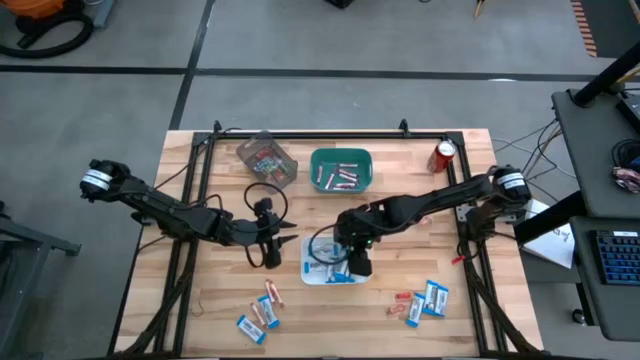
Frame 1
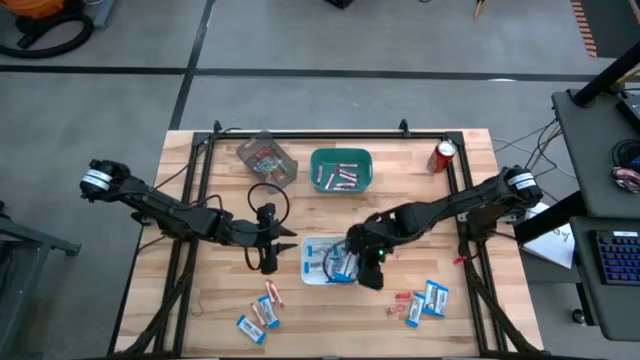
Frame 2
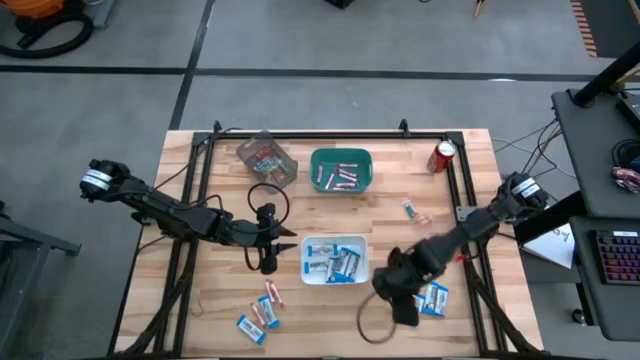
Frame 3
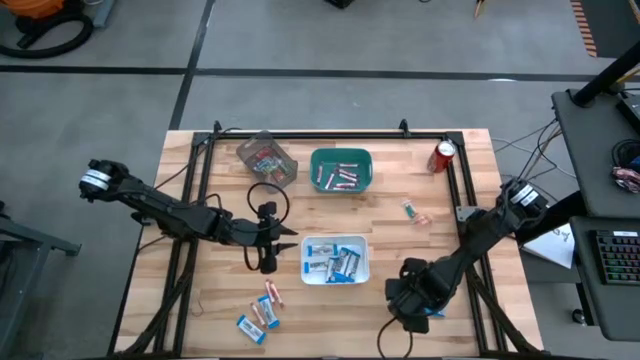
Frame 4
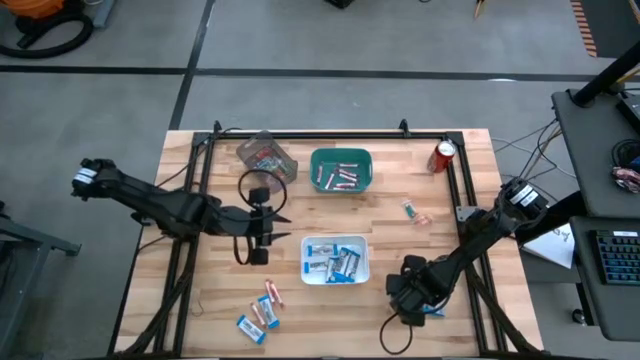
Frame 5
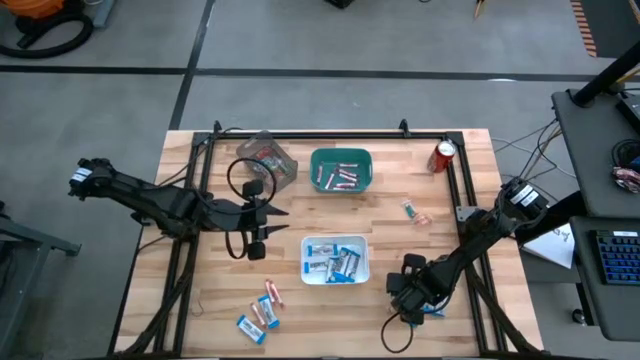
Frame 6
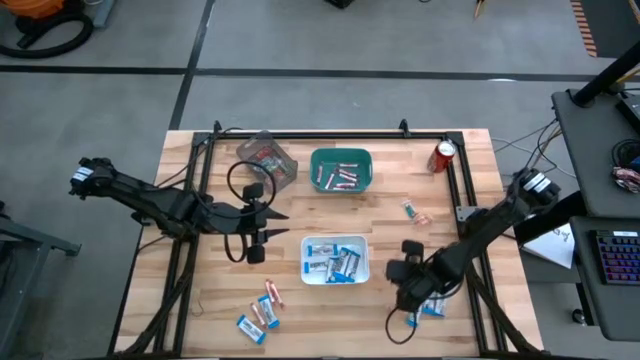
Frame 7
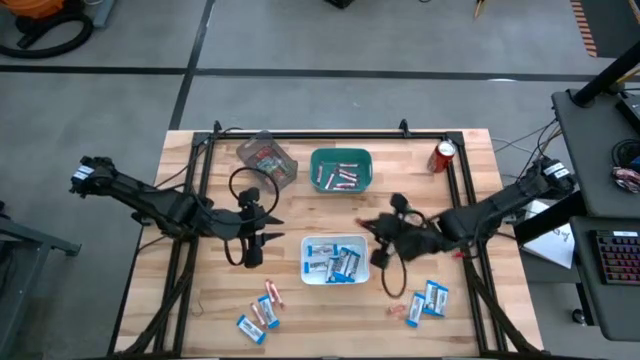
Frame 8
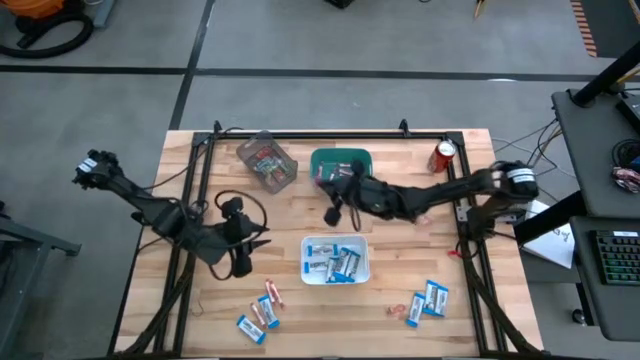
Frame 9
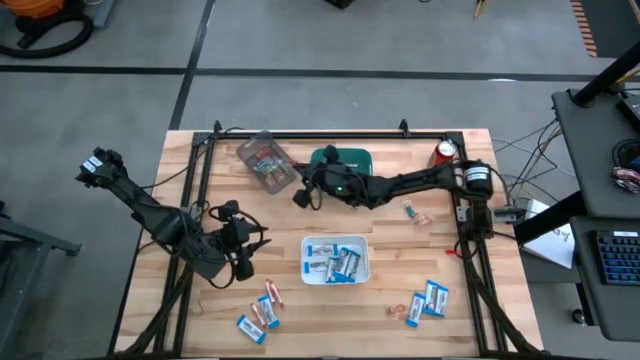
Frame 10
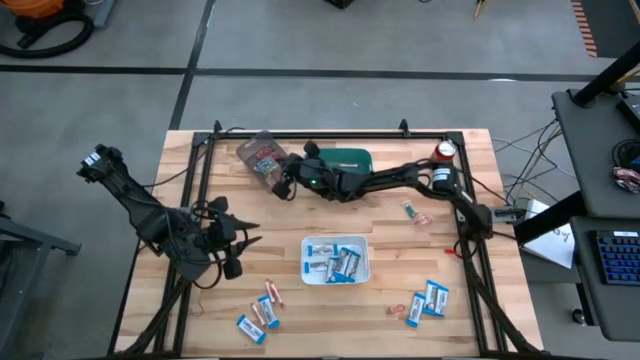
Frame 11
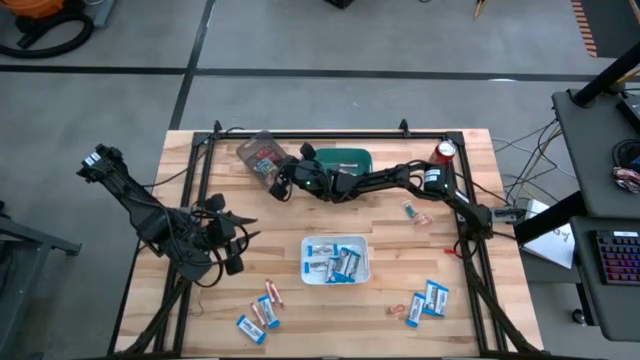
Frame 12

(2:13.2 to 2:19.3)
Task: Sort candy
Put the red gummy into the black bin

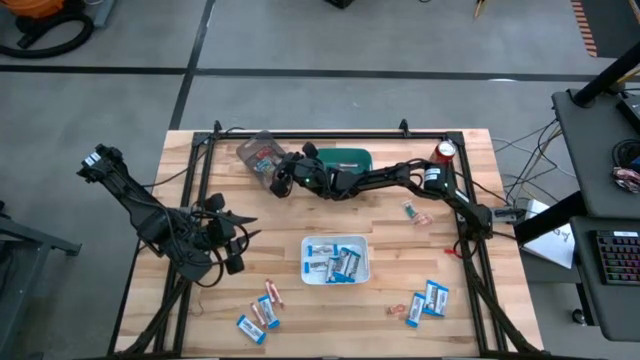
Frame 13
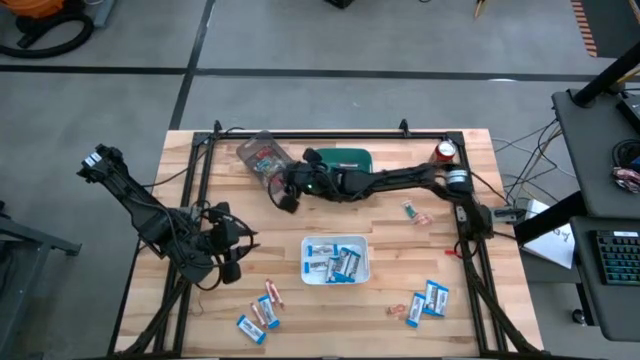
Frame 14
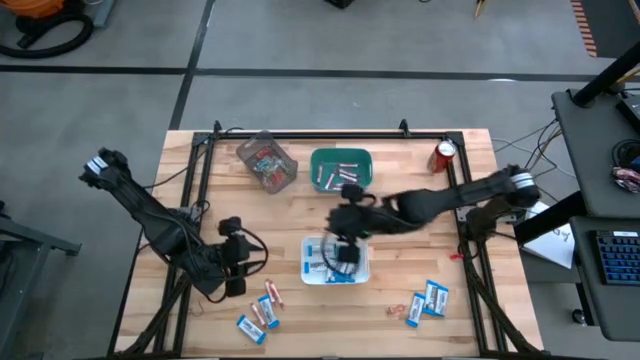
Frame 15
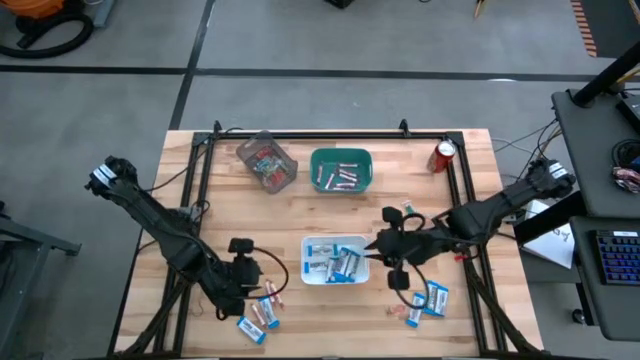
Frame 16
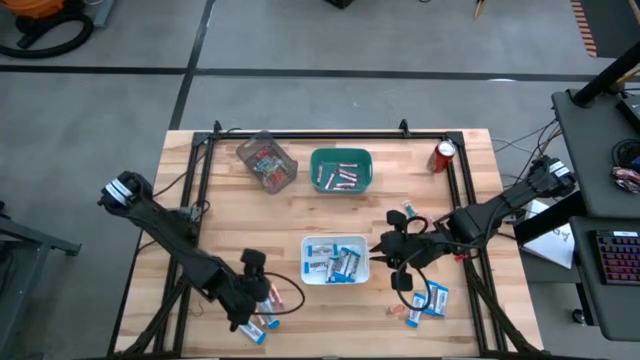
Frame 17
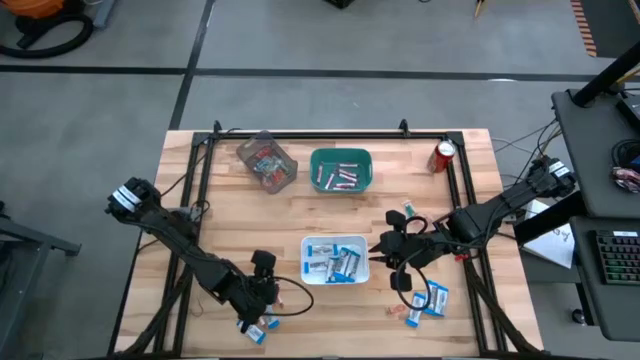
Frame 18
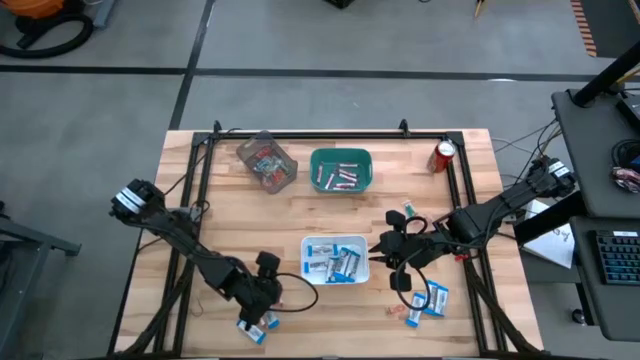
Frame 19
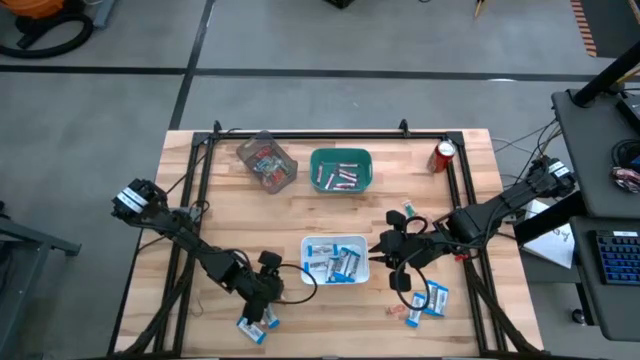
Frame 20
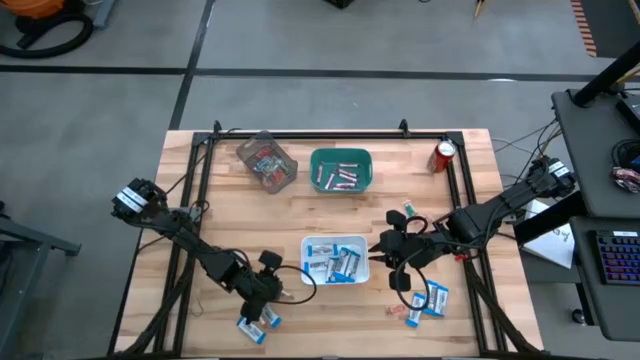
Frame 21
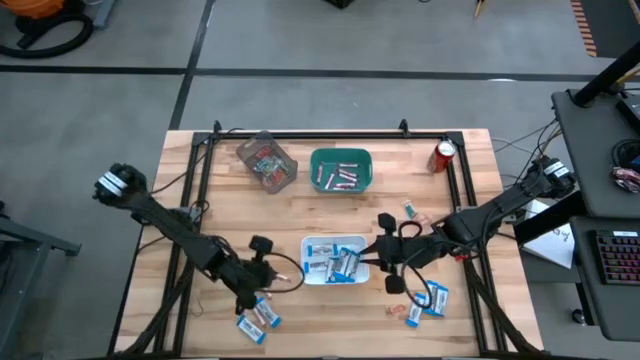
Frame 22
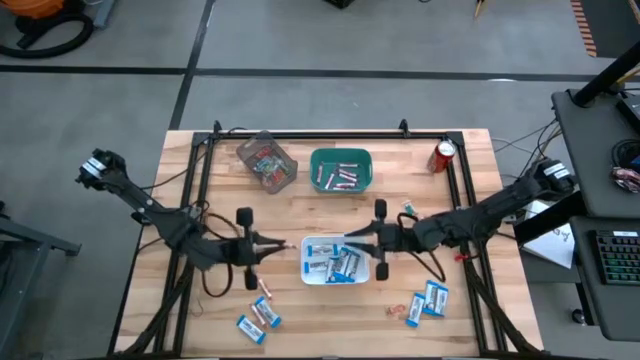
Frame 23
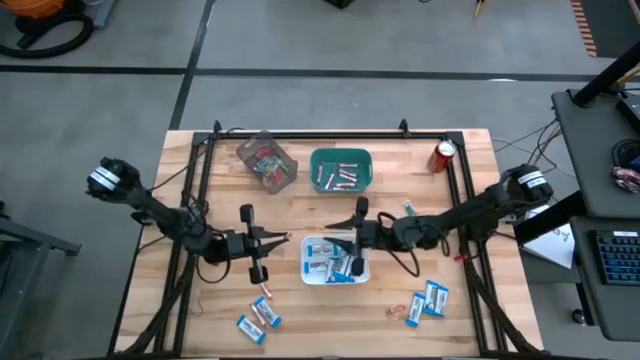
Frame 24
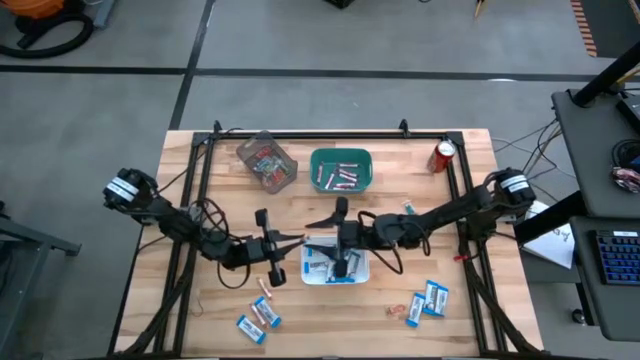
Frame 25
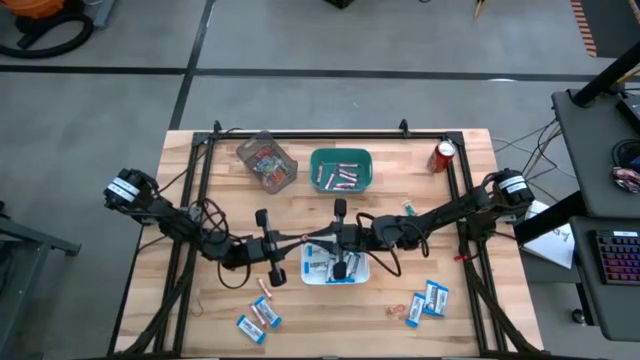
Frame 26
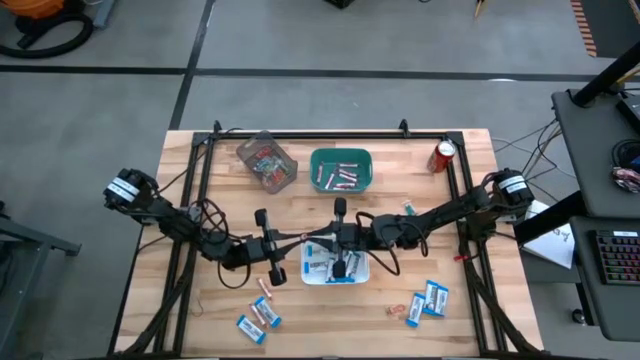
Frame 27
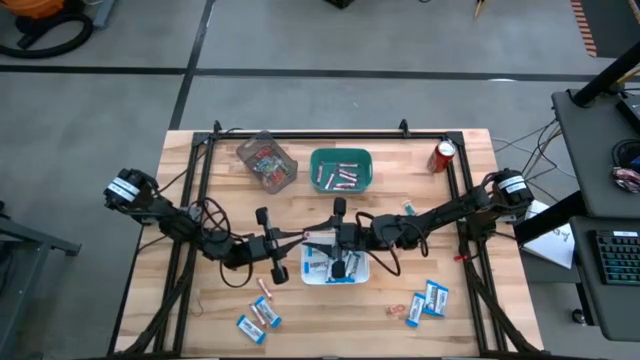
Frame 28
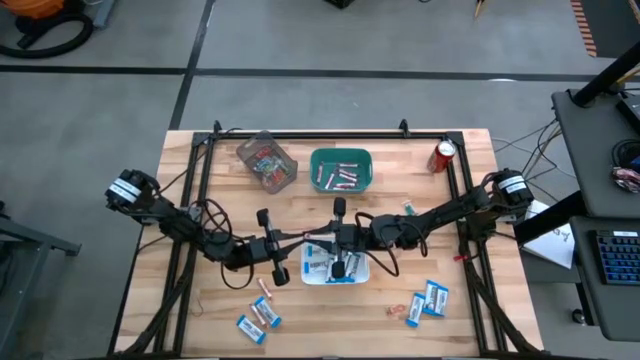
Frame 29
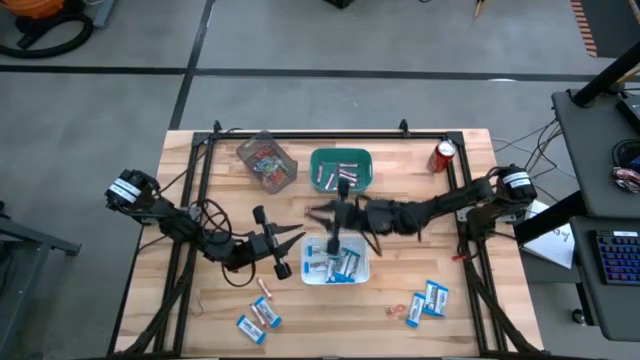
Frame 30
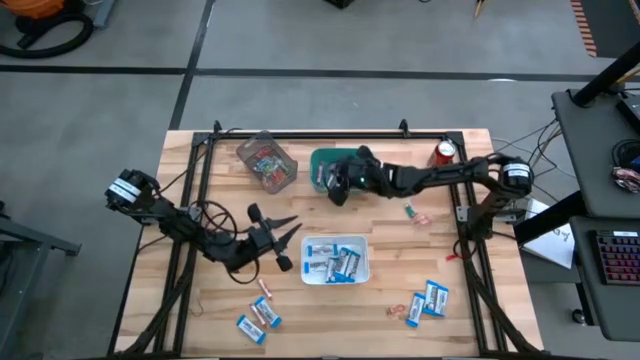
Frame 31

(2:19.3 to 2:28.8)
Put the white candy into the green bin

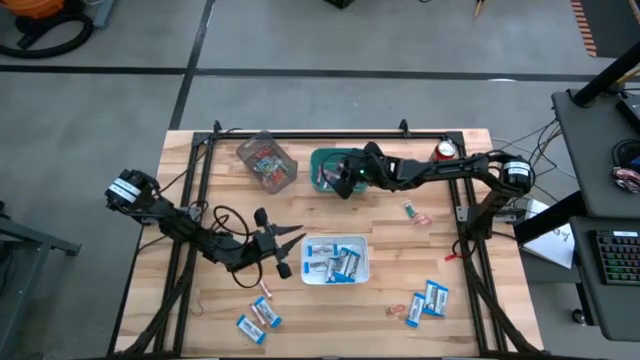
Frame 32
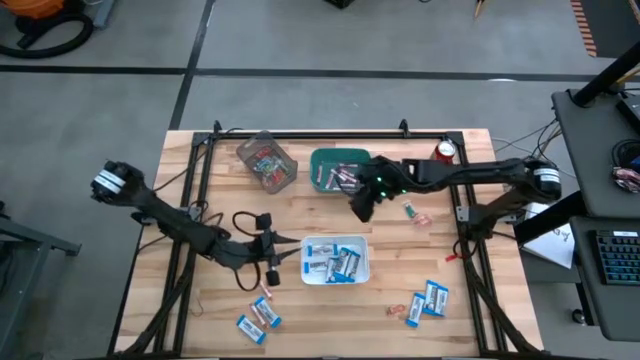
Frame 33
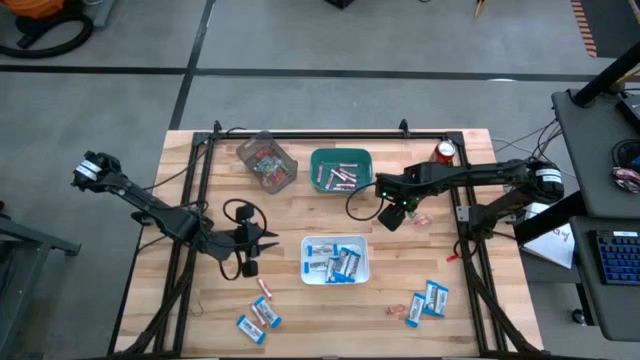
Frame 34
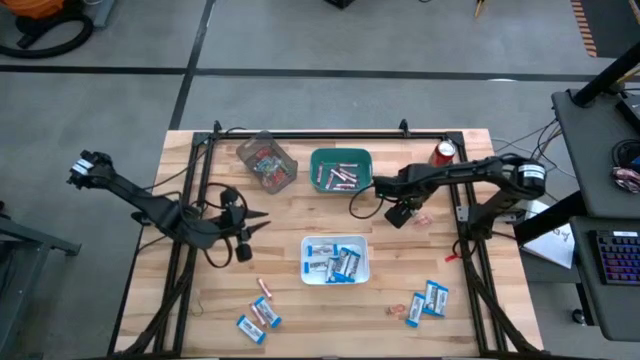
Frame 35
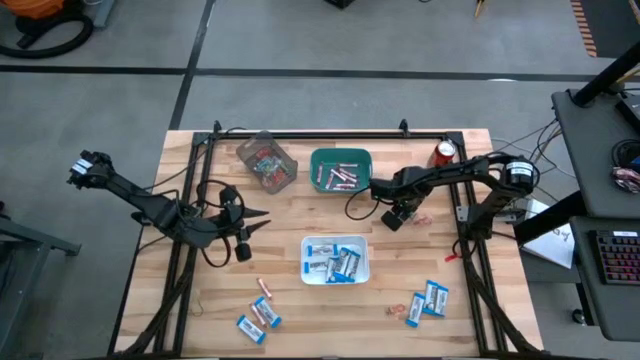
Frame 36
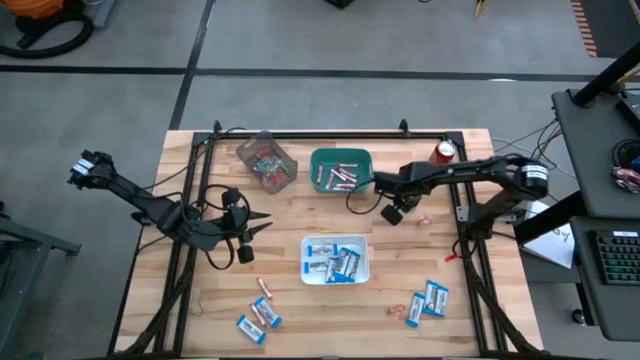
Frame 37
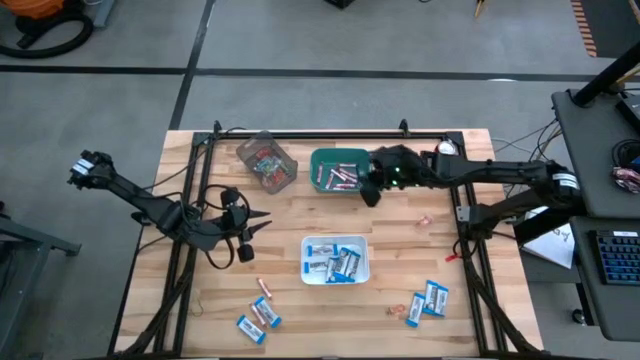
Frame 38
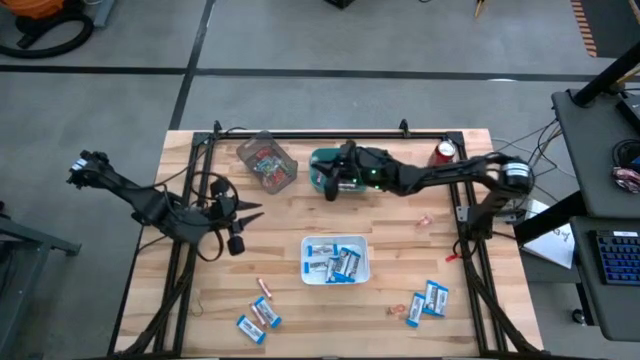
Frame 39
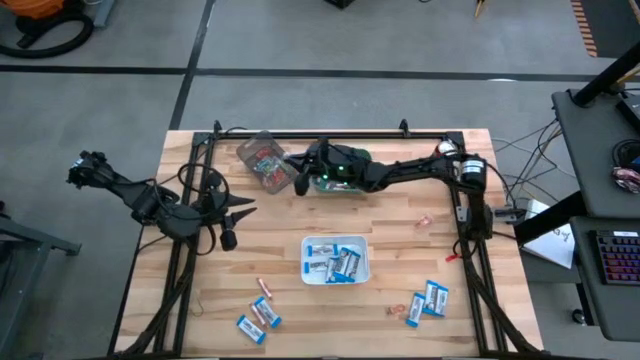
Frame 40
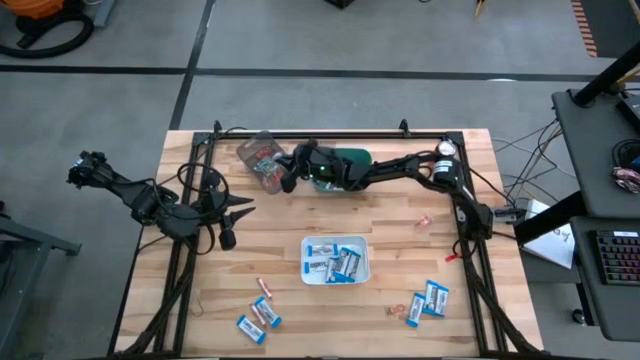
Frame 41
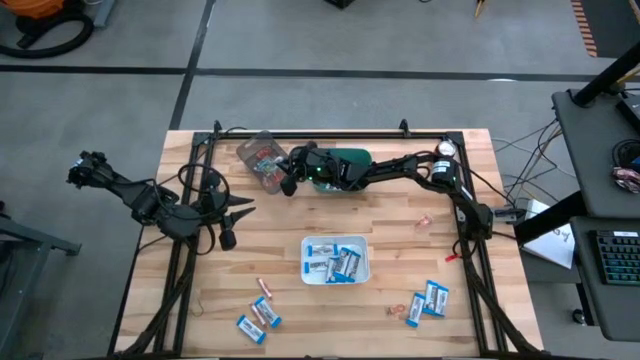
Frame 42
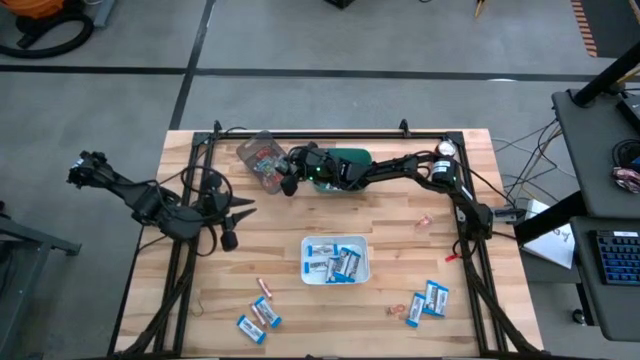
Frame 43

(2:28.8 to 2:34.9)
Put the blue gummy into the black bin
